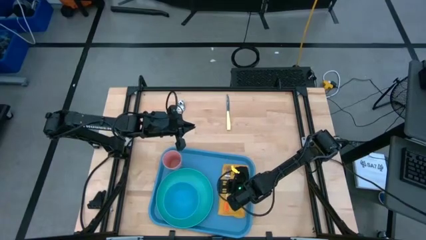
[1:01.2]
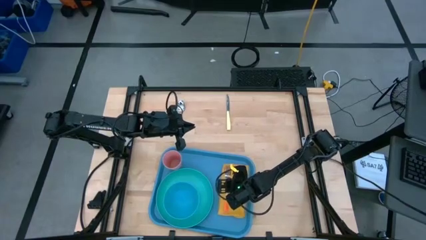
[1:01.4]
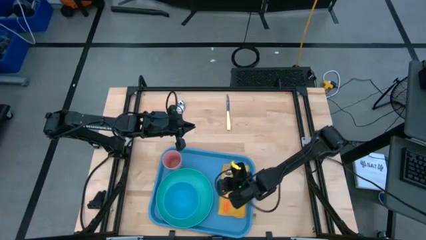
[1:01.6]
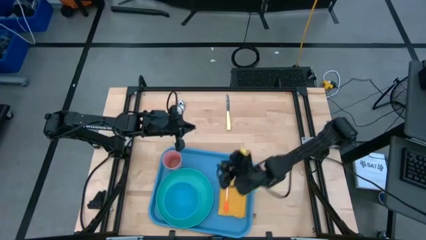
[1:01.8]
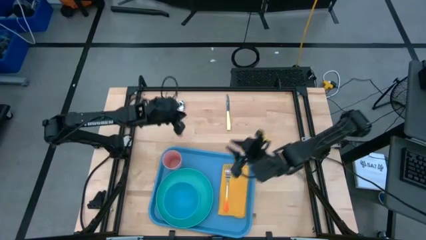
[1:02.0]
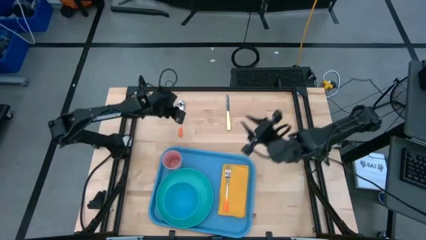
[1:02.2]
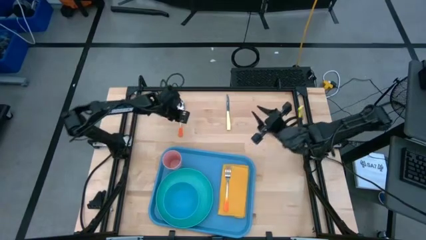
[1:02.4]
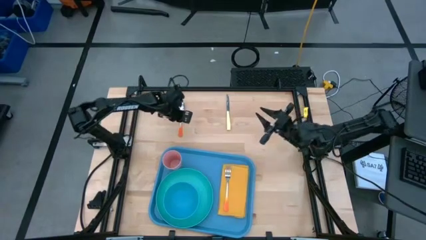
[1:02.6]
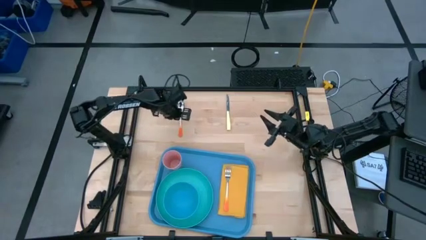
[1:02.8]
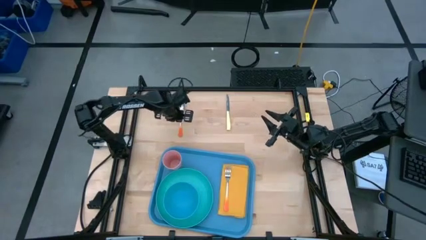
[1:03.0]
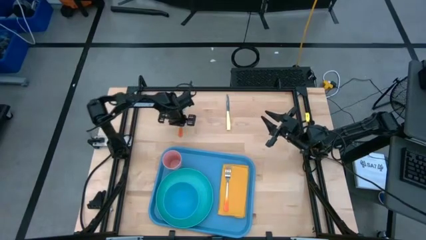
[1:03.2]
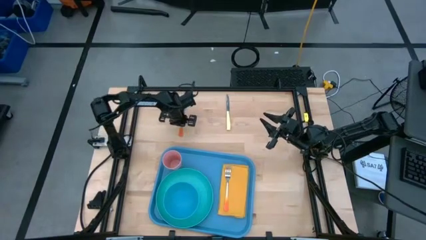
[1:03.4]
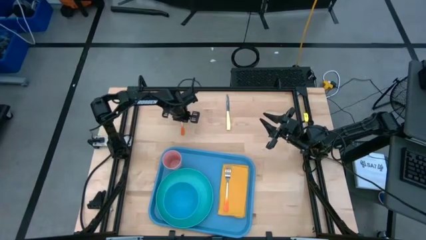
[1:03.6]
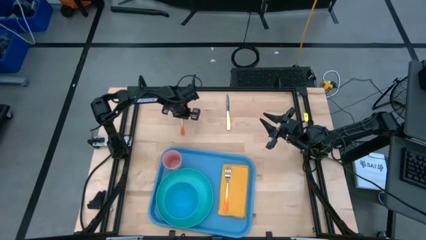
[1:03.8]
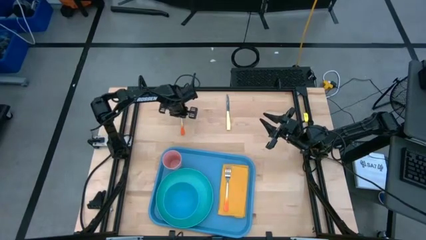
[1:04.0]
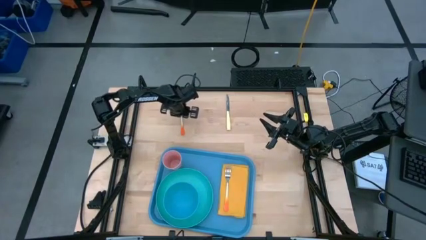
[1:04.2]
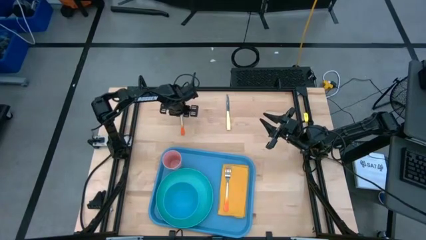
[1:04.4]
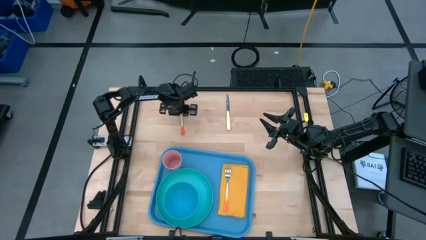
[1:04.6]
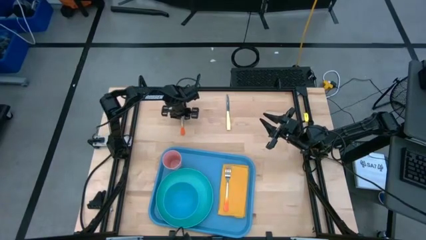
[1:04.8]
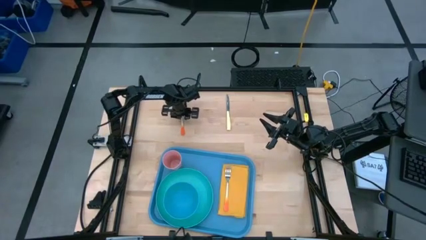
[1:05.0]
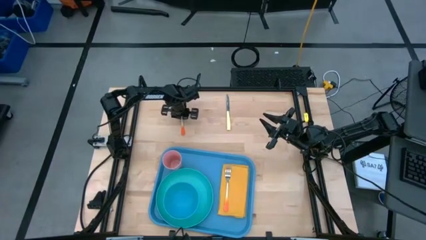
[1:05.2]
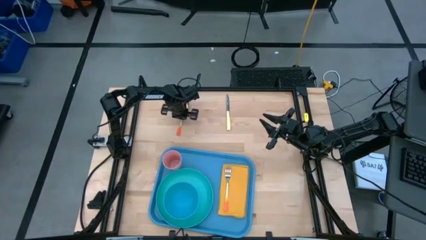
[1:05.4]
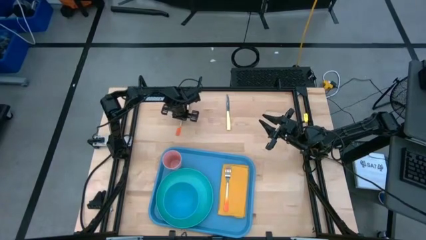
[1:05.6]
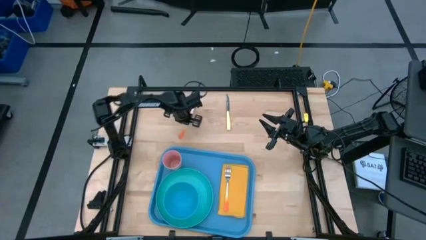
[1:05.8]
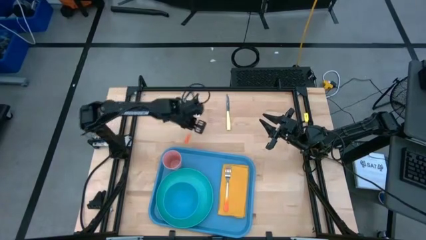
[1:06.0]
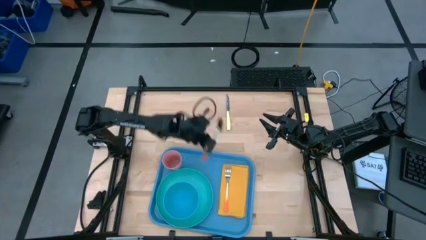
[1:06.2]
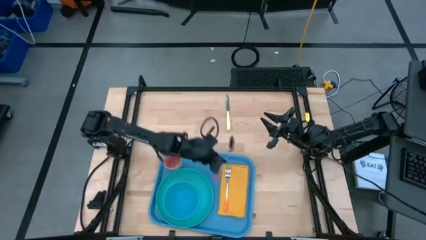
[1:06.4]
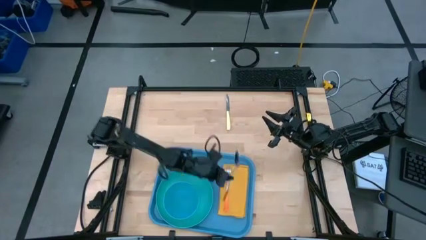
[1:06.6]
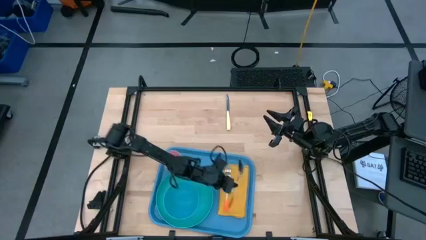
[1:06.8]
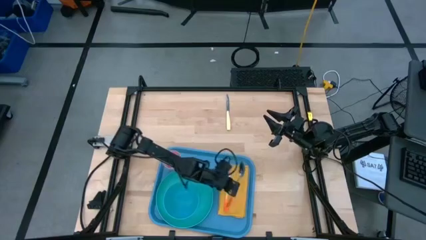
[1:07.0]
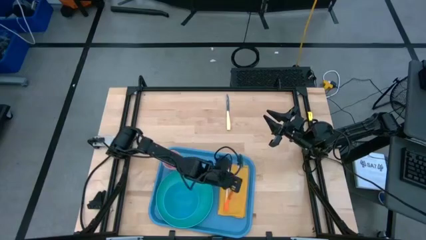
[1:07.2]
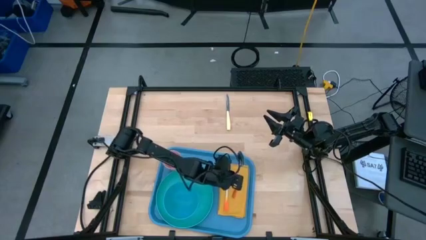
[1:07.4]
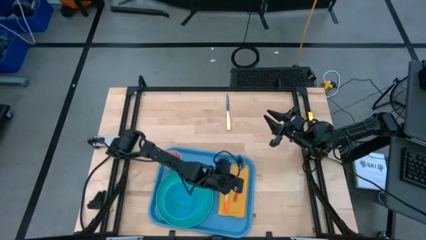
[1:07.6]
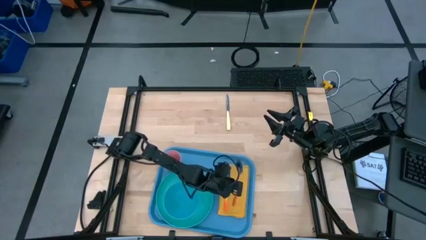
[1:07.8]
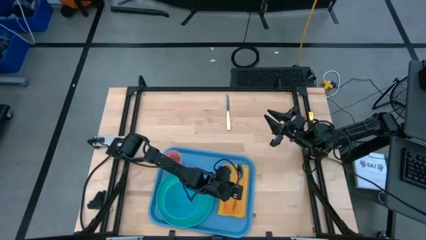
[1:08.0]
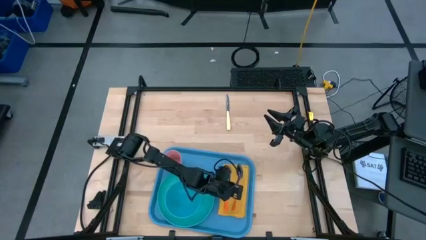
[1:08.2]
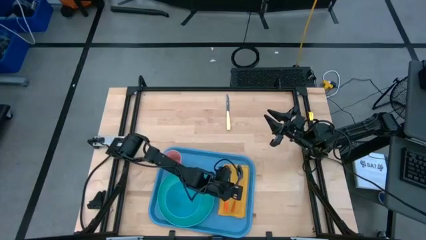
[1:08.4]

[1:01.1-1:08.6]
Task: Set up tray
Put the orange spoon to the right of the orange fork on the yellow napkin

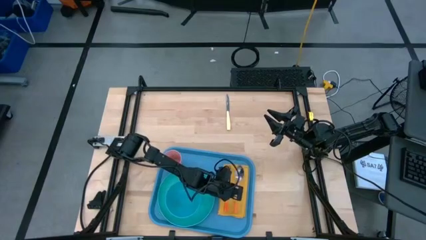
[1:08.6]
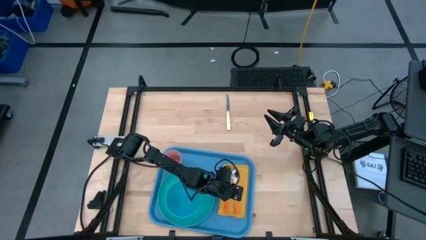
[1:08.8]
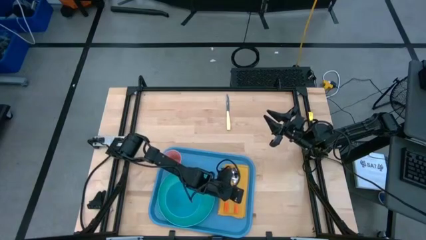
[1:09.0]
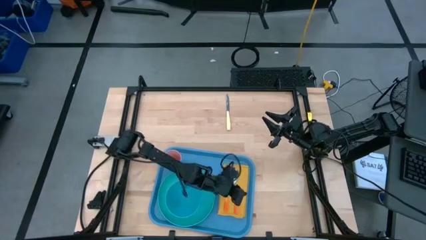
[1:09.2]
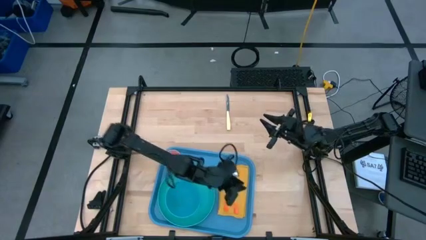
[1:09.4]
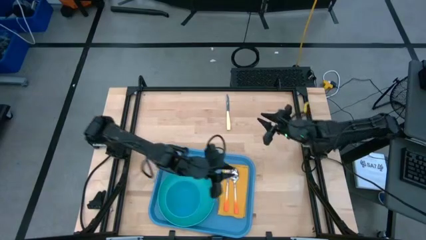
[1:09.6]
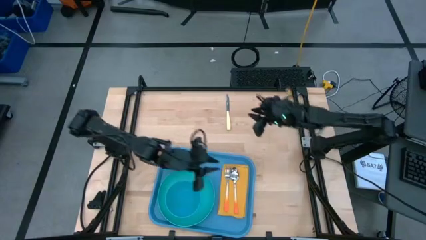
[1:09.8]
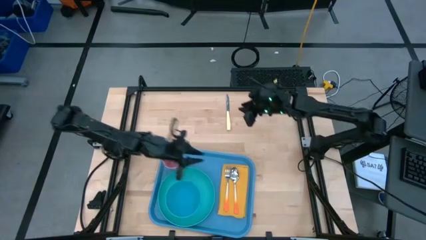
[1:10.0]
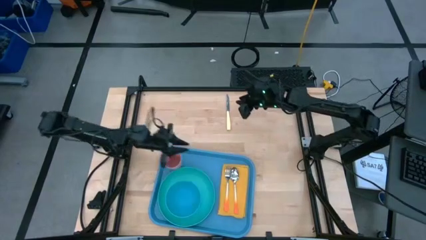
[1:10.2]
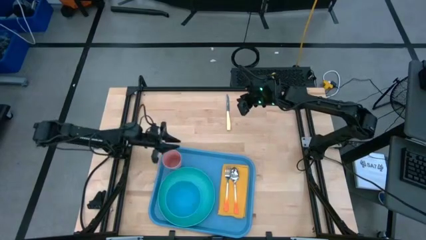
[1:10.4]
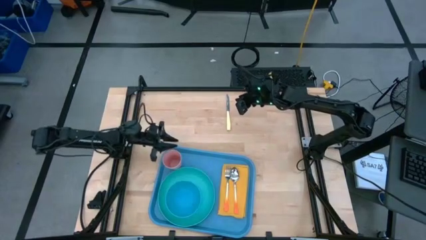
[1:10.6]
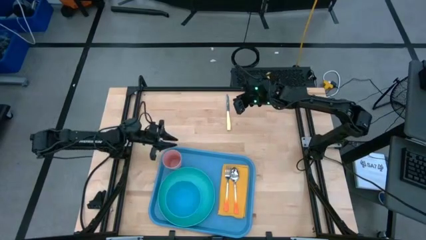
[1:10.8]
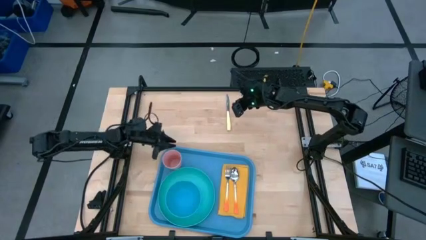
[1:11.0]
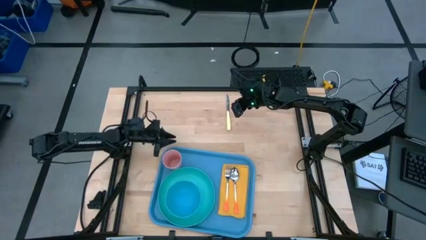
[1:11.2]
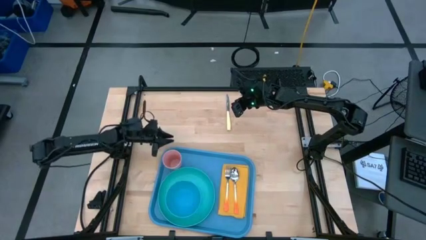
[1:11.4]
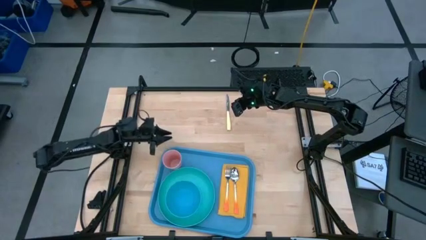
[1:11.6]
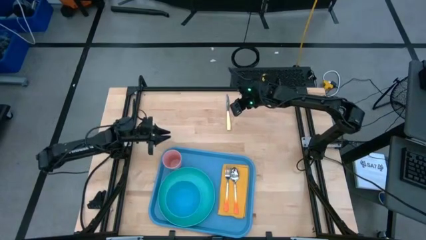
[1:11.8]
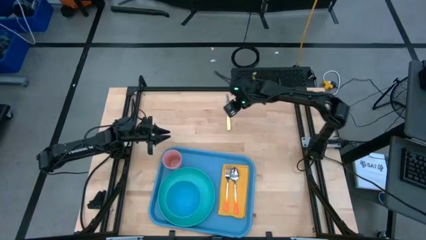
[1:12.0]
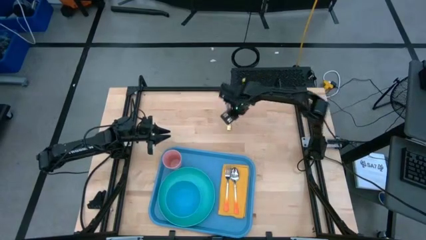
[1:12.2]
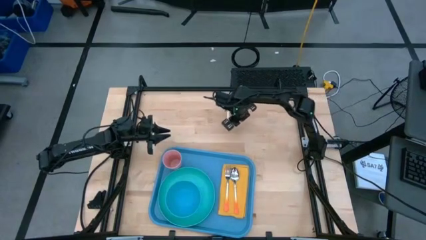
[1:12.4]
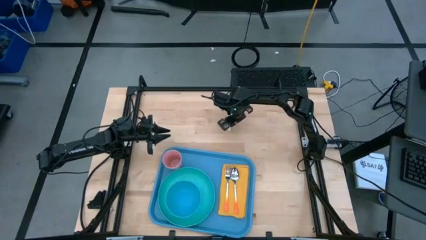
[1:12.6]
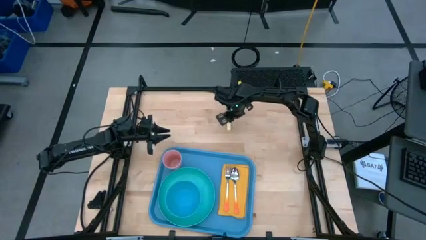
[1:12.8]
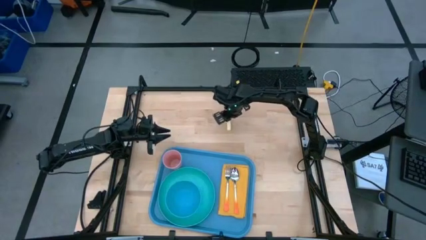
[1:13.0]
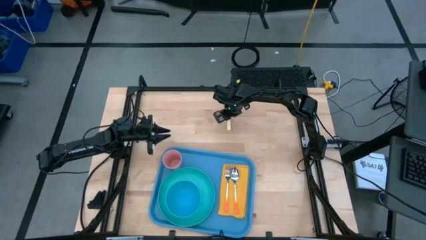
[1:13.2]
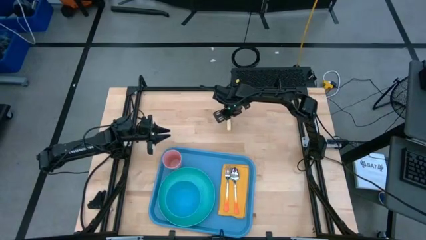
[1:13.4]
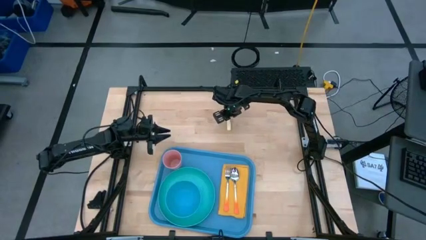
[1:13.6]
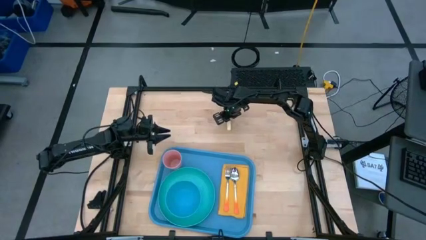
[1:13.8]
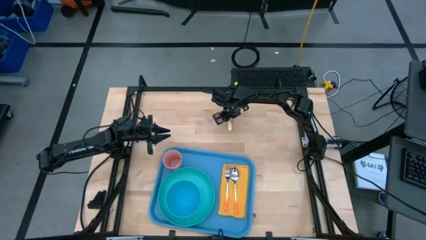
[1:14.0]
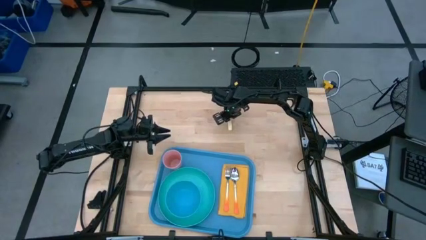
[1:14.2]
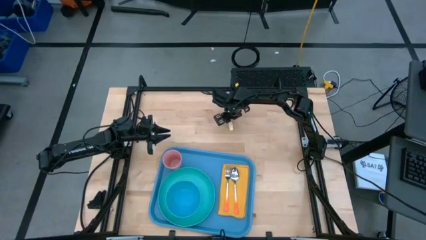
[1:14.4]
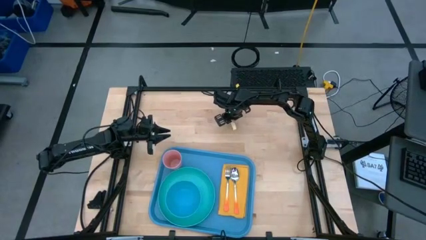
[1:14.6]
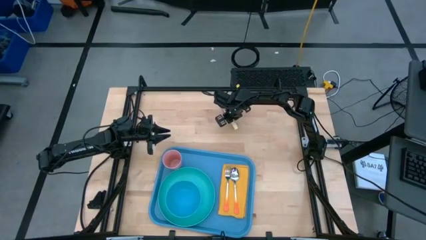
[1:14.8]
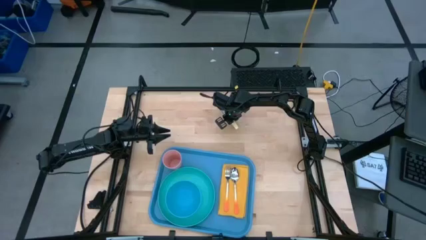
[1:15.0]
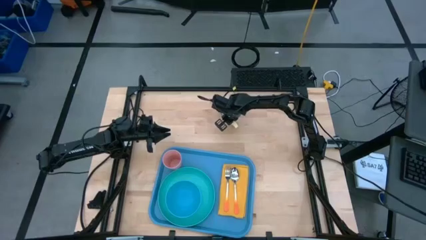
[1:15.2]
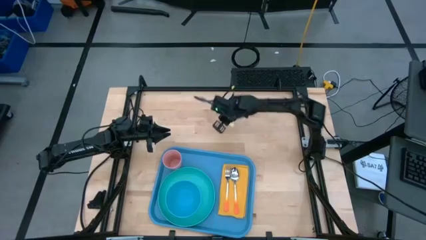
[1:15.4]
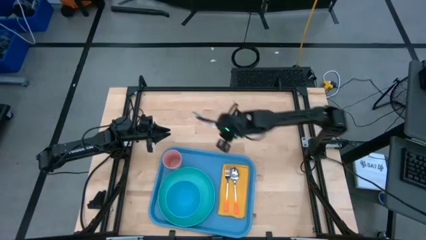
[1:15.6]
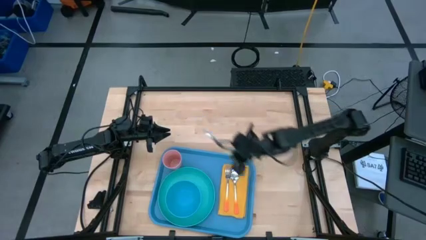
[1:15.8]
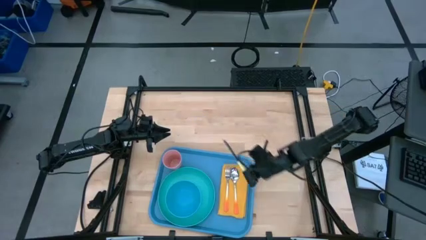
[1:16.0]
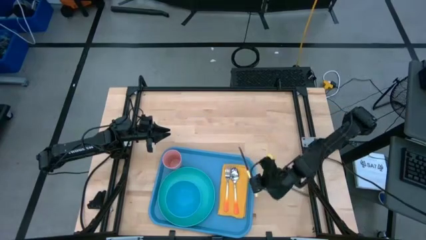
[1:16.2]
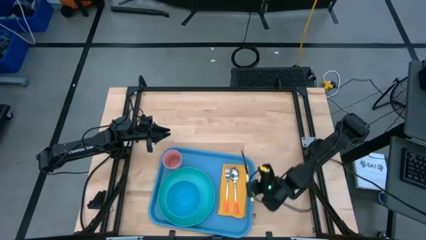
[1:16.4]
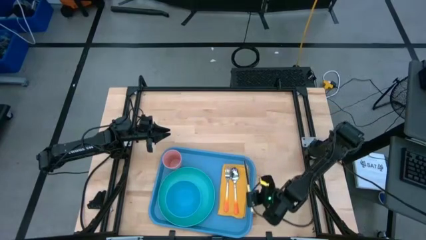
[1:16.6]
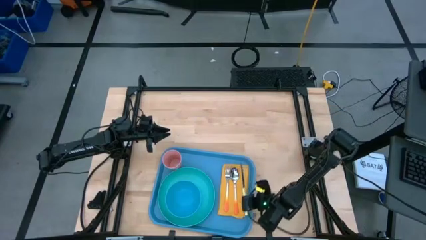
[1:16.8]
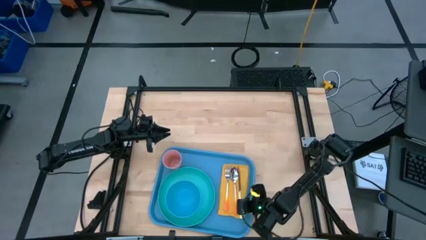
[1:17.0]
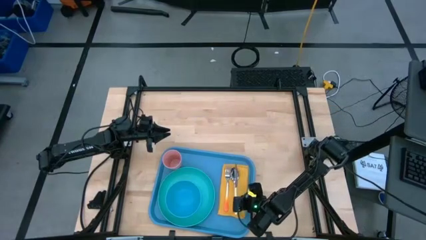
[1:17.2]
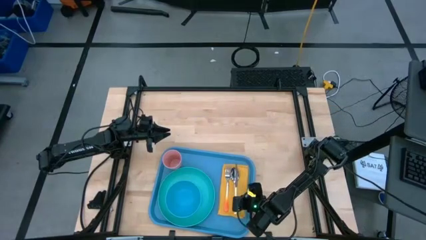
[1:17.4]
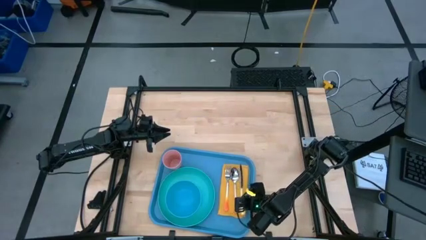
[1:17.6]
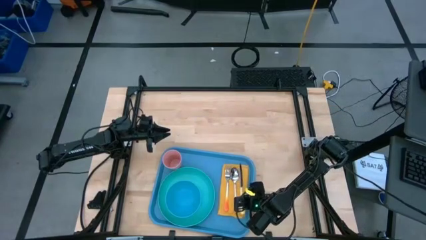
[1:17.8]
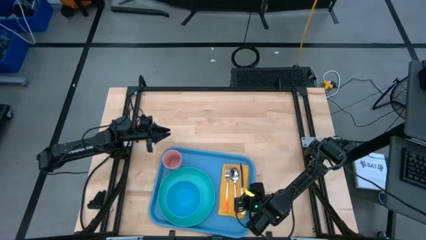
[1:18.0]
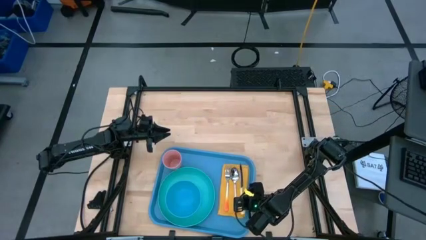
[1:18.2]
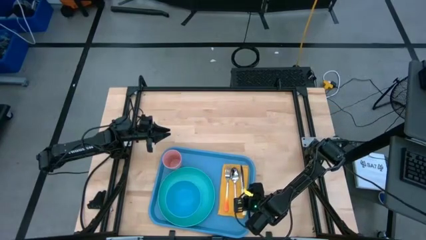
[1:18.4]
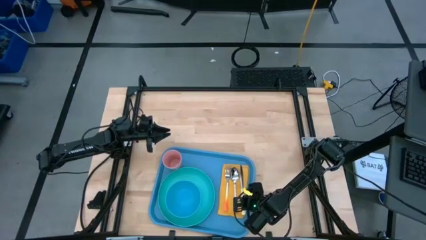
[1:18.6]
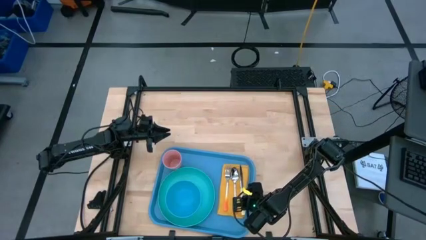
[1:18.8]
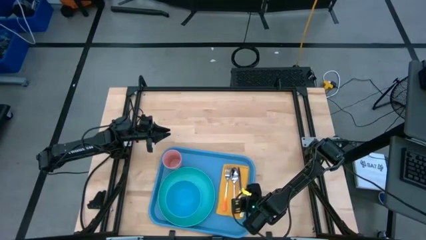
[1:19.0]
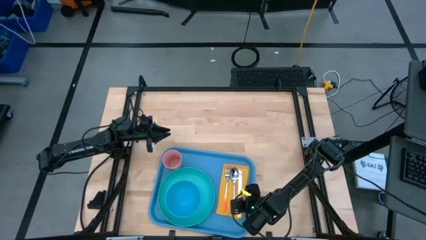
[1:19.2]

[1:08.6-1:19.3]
Put the yellow knife to the right of the orange spoon on the yellow napkin
